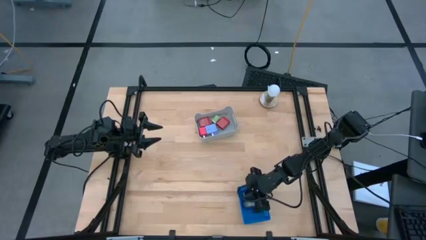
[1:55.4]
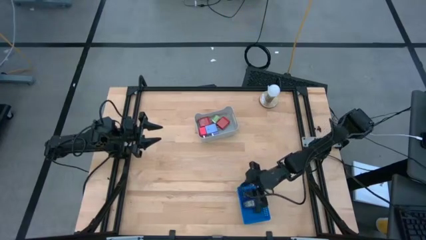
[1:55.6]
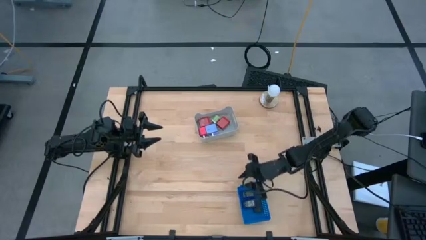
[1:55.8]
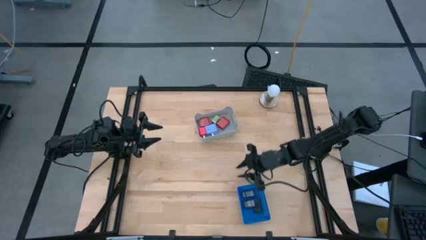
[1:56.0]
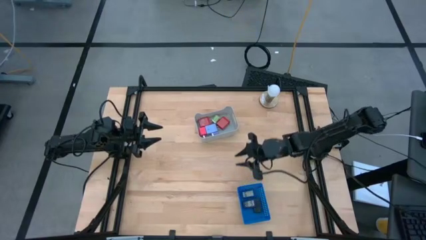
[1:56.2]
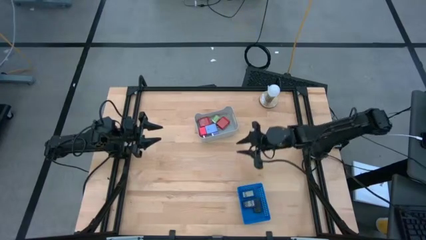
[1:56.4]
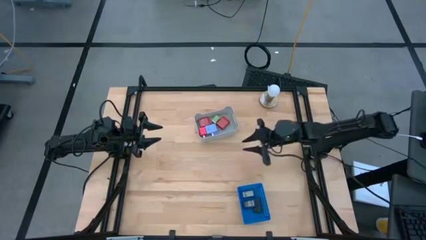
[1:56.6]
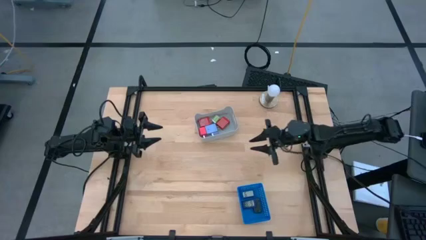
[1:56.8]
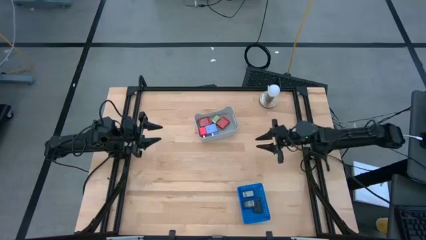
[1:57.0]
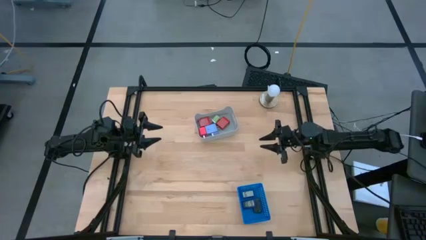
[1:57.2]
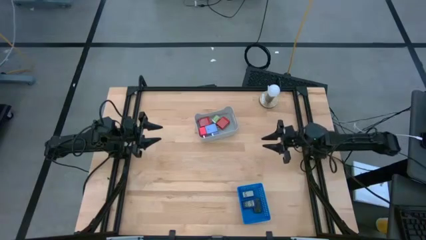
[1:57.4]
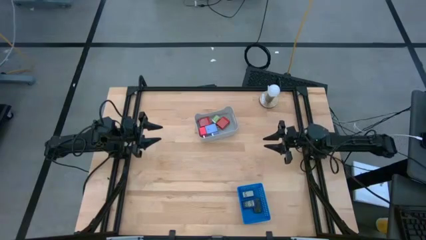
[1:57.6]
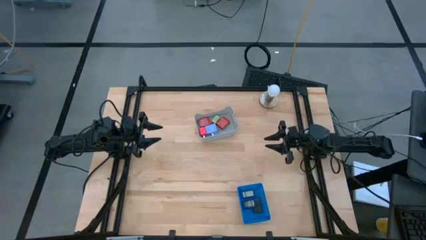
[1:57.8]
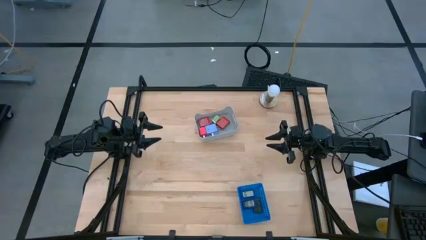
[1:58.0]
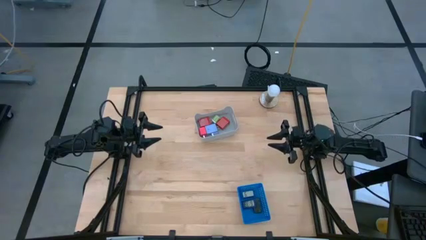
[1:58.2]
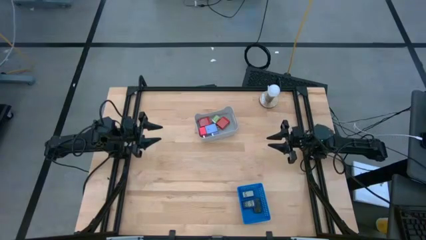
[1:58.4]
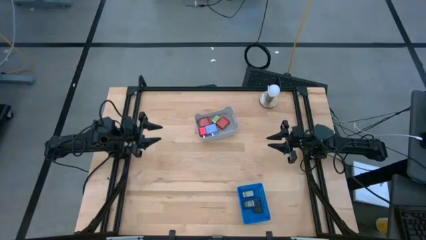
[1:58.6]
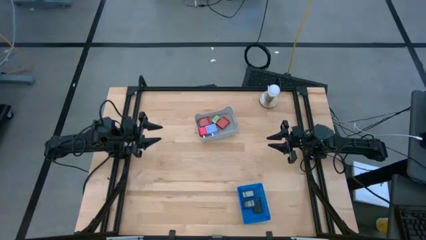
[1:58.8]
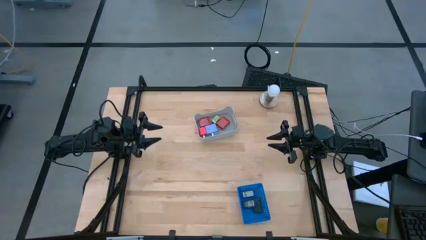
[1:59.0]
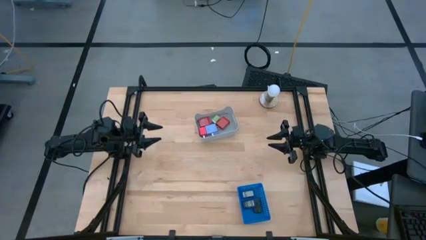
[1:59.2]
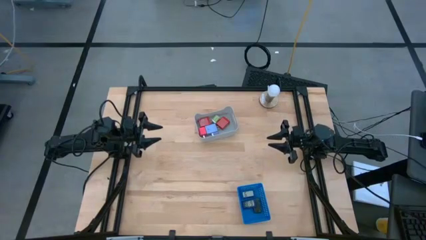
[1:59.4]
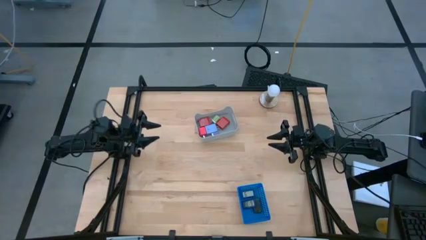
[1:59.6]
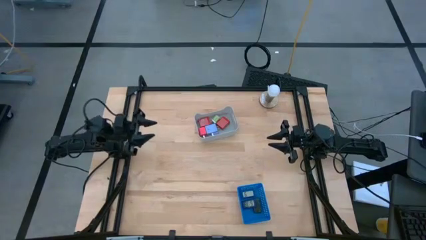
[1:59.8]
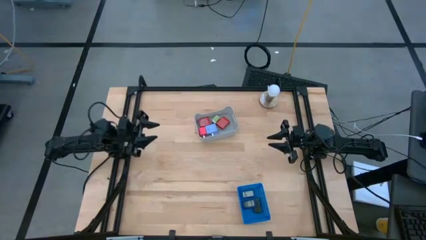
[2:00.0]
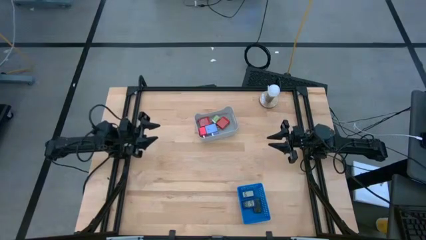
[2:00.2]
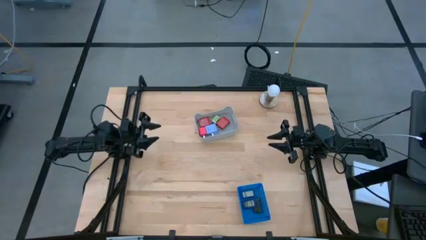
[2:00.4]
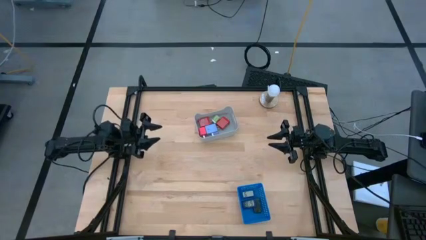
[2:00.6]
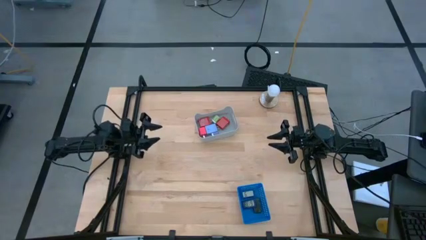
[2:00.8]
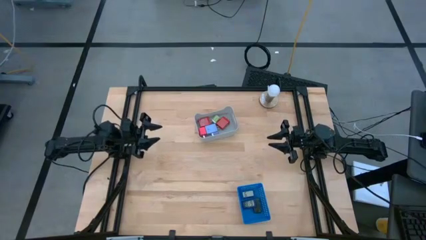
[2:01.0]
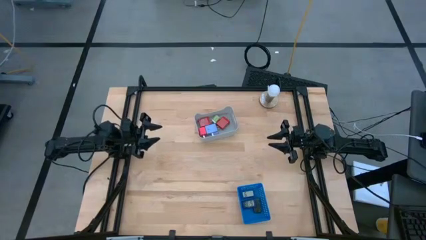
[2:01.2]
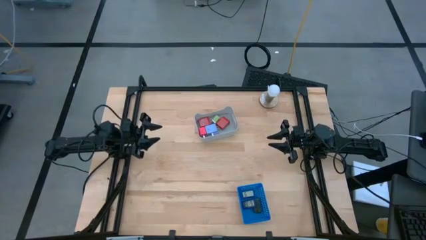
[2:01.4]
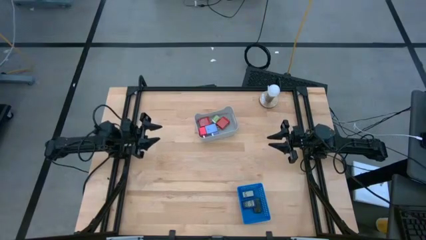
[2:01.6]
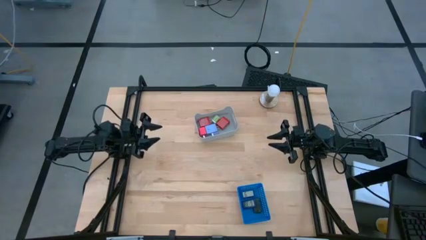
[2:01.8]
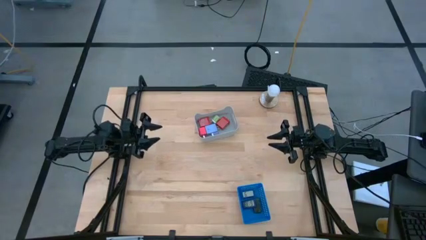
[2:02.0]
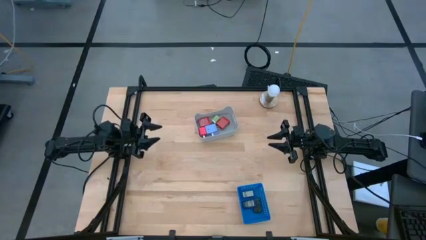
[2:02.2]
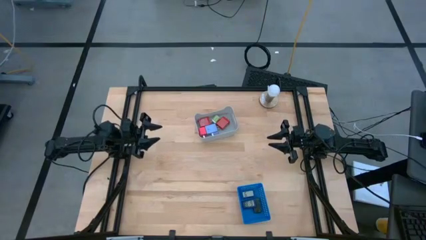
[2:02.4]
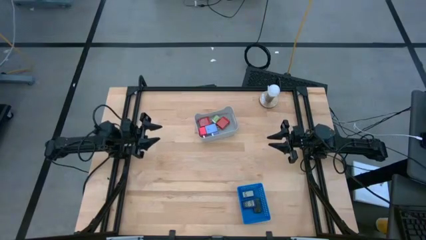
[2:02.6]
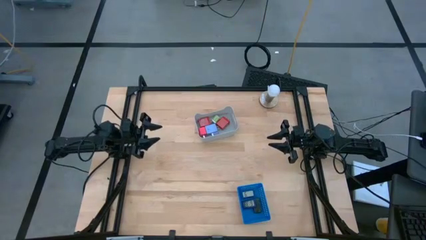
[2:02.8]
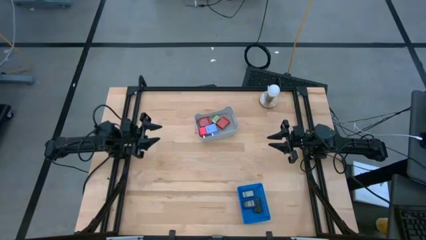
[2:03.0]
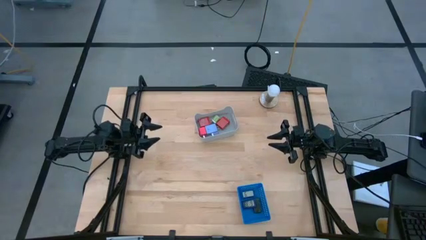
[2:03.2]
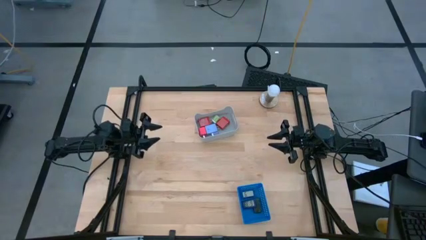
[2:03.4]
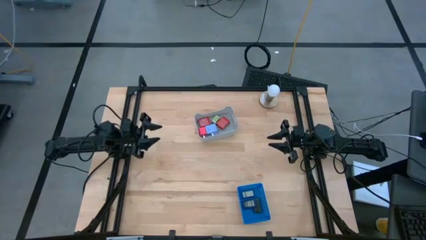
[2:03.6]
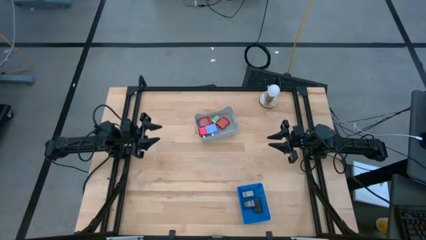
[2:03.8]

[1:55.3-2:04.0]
Task: Pick & Place Office items
Return to Home Position

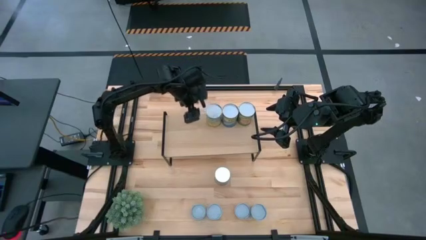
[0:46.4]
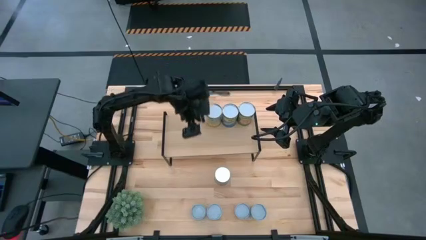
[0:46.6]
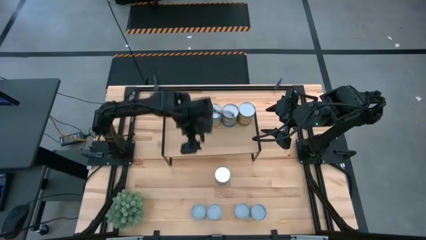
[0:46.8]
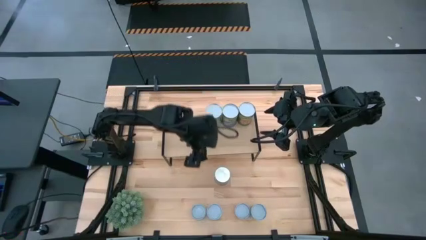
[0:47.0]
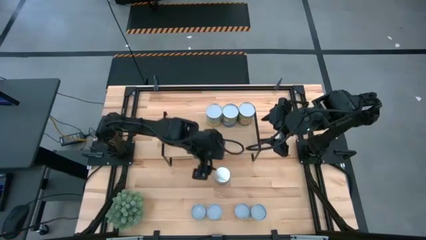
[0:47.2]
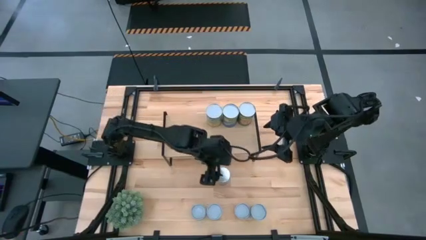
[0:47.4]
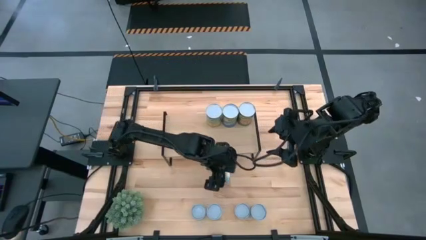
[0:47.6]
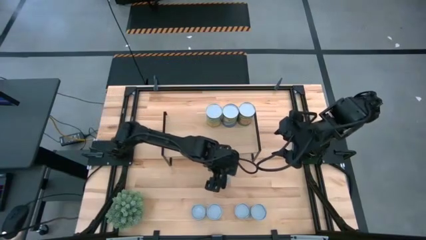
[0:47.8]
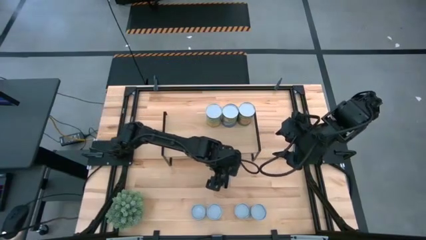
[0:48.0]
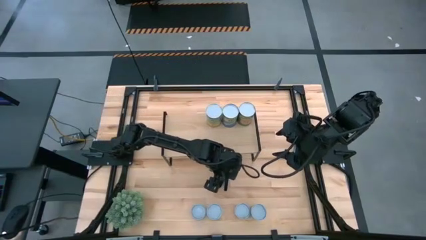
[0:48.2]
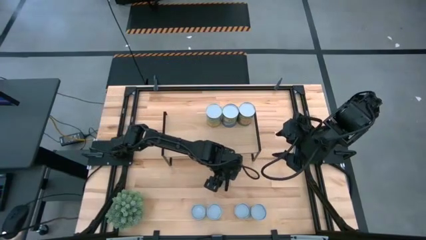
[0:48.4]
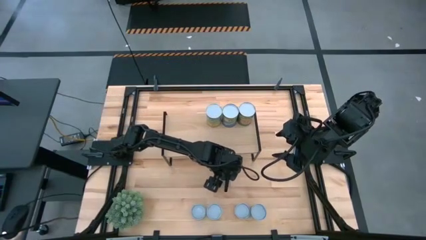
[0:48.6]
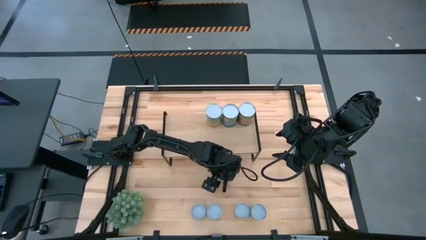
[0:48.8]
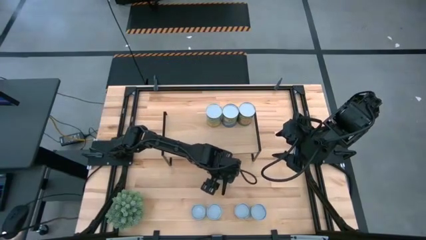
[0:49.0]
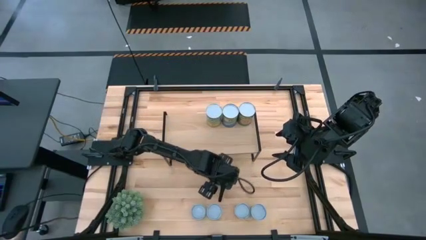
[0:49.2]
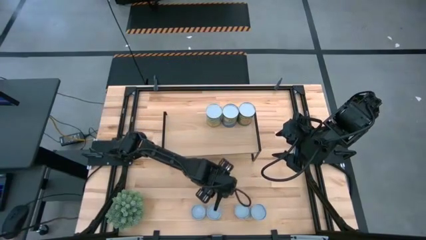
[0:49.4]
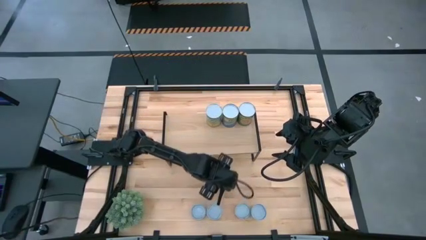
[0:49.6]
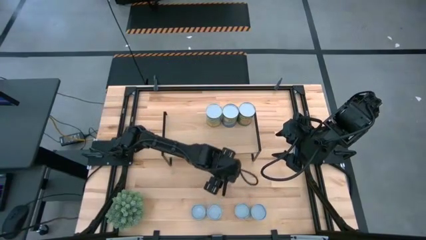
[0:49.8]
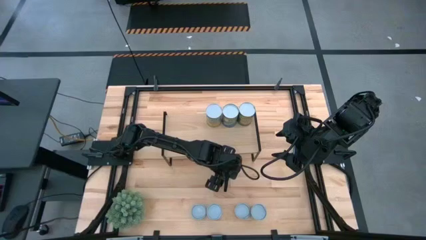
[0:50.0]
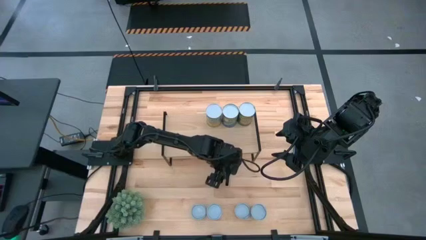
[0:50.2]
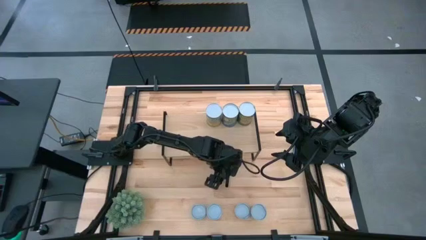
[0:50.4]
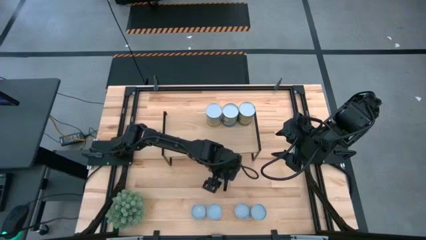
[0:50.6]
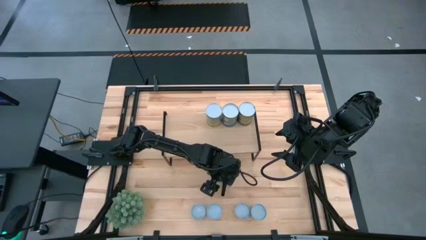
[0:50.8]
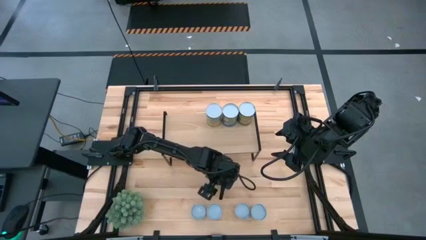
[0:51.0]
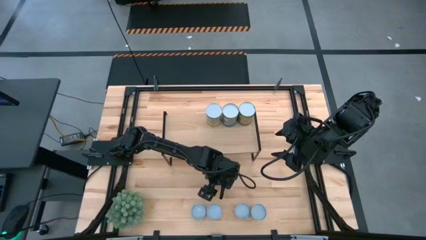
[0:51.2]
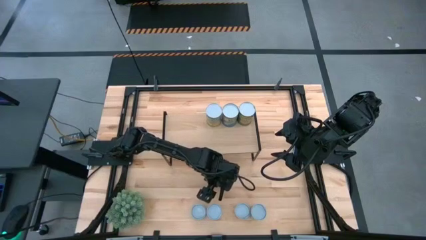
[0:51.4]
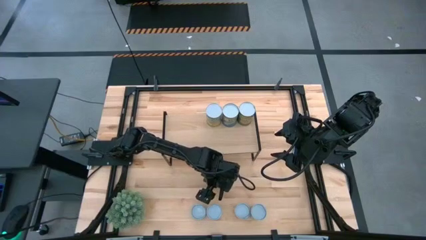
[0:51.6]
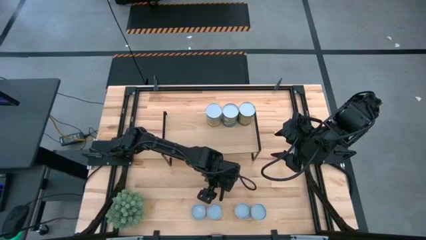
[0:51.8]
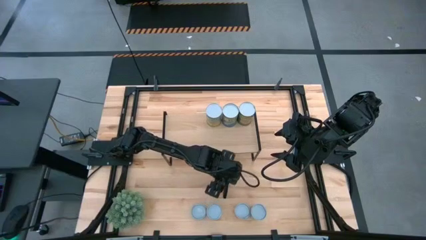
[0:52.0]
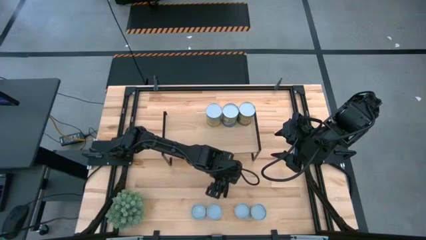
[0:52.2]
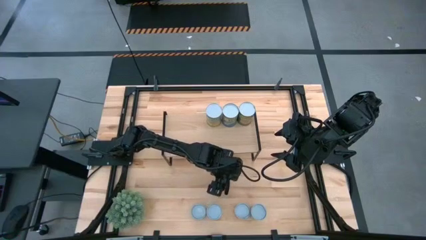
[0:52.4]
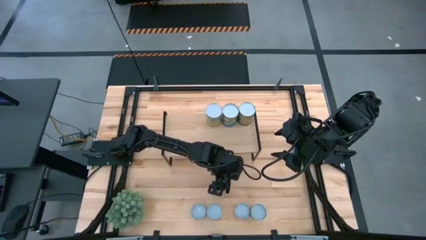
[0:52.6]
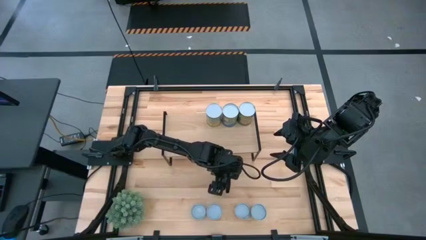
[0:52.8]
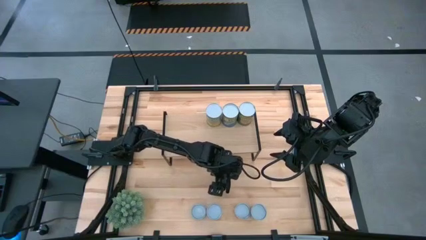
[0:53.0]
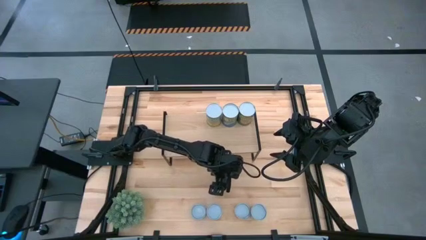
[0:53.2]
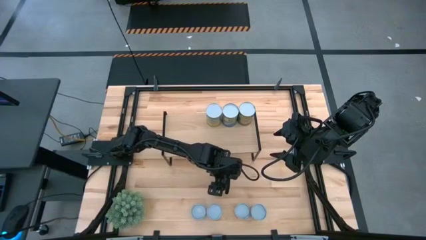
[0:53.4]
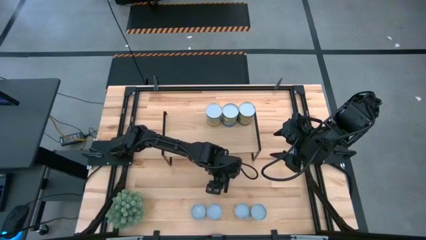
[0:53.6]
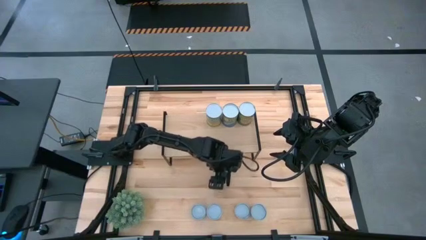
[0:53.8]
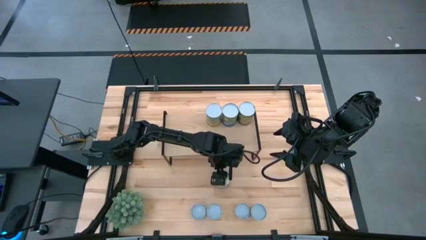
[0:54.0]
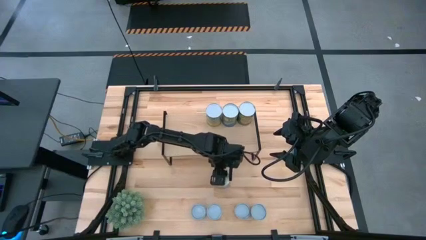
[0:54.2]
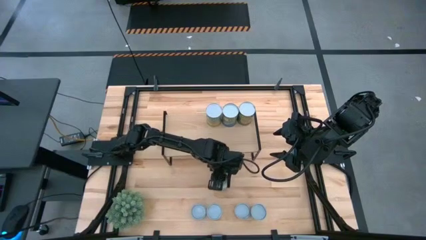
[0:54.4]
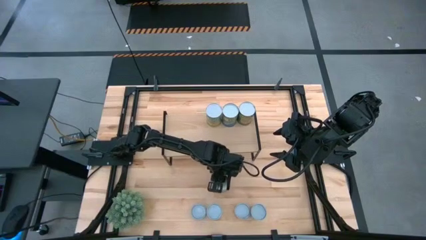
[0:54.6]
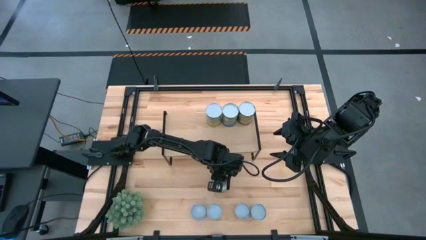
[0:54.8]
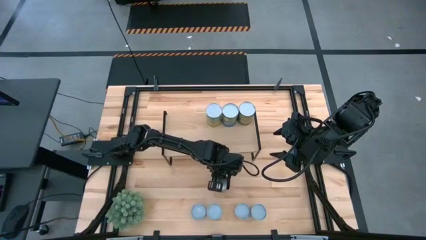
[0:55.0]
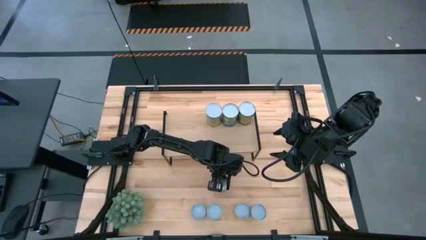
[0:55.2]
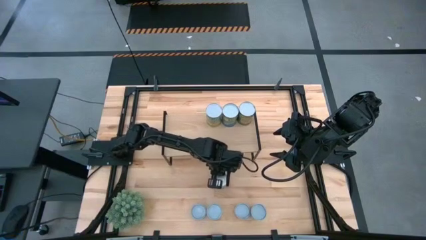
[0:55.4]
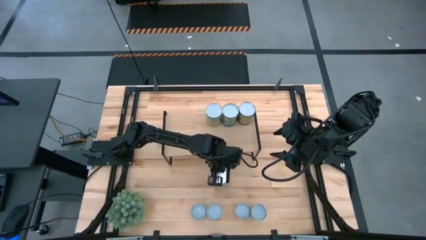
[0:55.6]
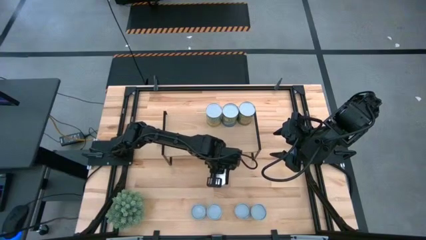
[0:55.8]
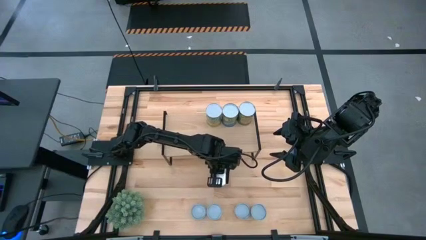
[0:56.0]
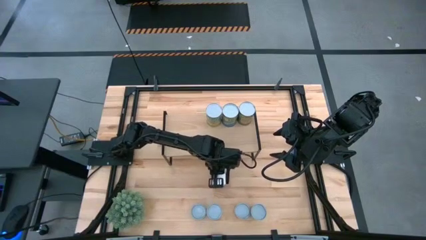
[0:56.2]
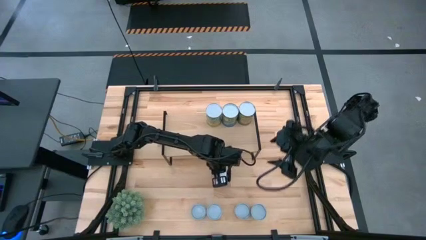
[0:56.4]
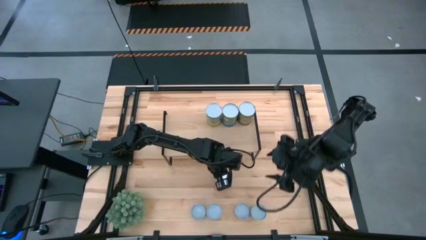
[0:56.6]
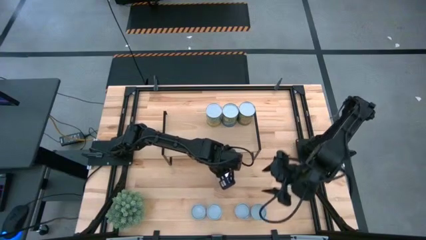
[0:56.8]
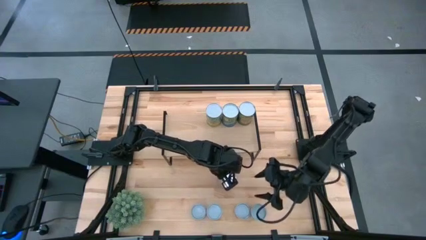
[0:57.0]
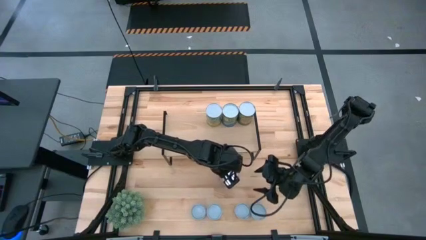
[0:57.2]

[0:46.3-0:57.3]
Task: Pick and place cans onto a shelf
Put the canned peaches on the shelf
